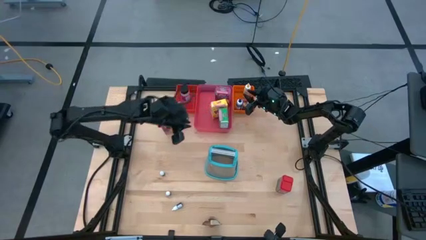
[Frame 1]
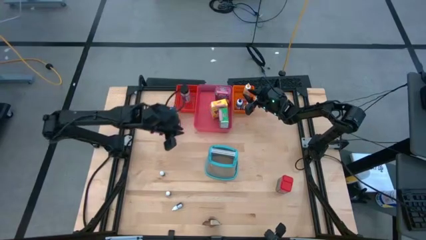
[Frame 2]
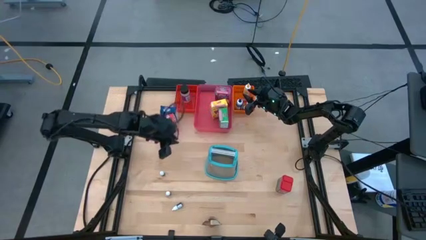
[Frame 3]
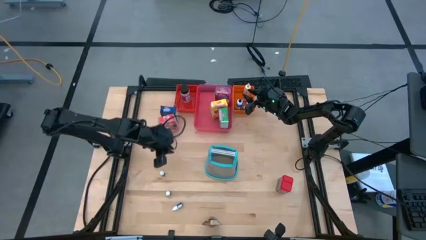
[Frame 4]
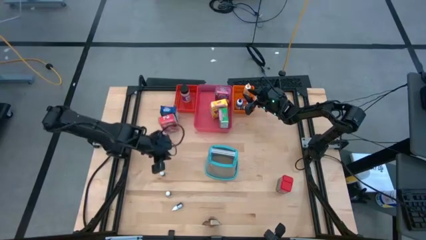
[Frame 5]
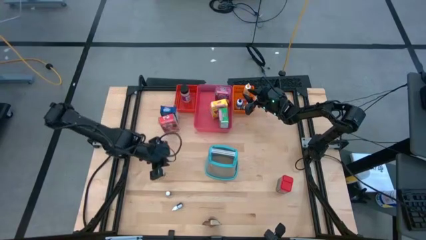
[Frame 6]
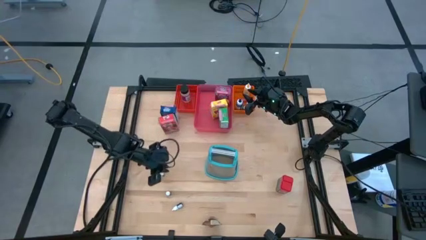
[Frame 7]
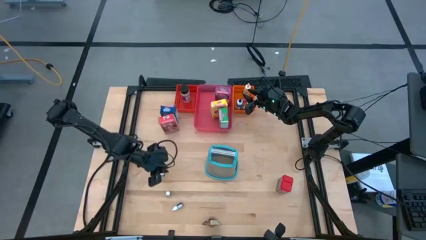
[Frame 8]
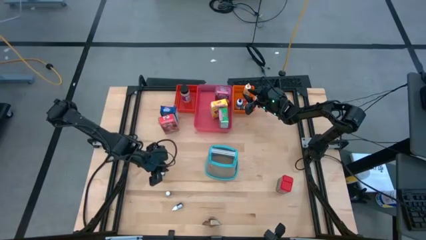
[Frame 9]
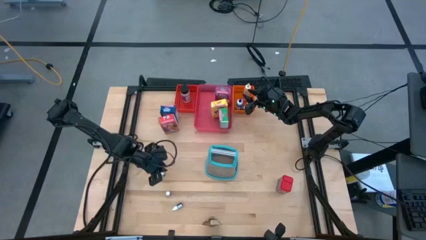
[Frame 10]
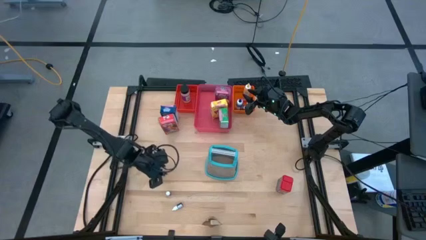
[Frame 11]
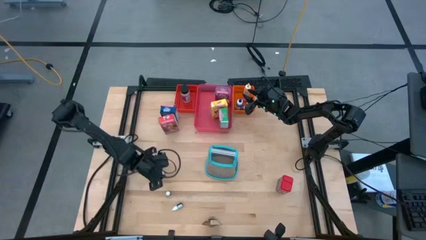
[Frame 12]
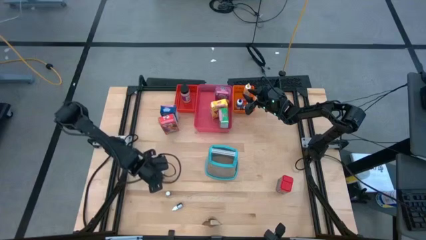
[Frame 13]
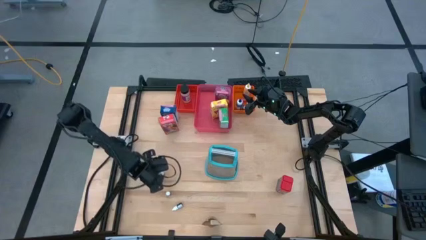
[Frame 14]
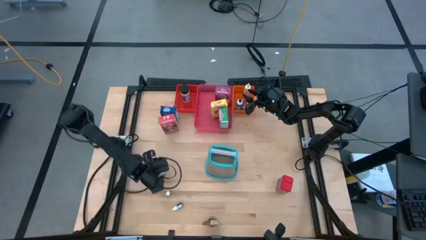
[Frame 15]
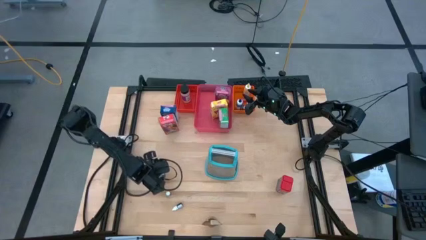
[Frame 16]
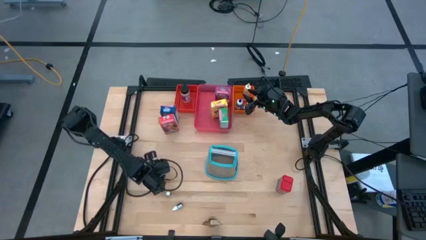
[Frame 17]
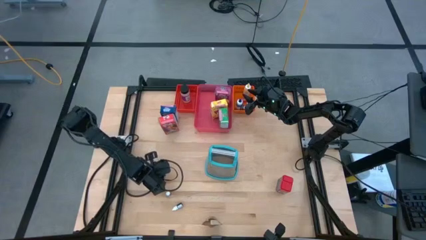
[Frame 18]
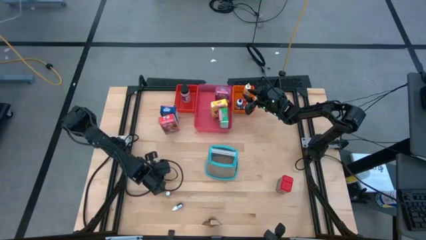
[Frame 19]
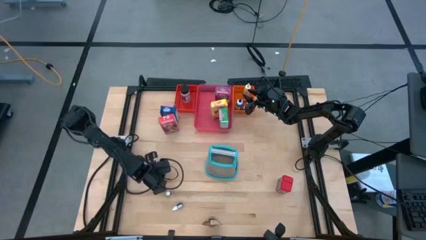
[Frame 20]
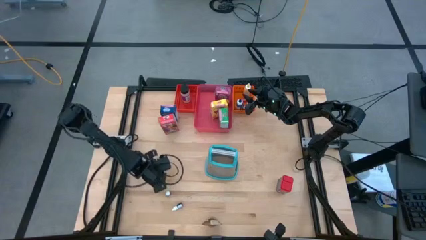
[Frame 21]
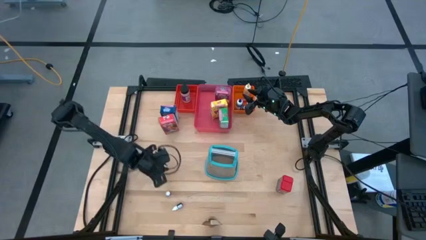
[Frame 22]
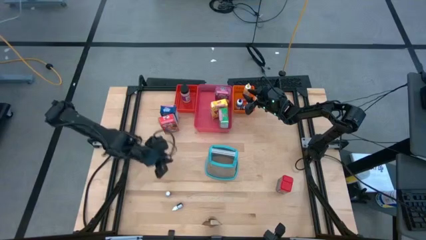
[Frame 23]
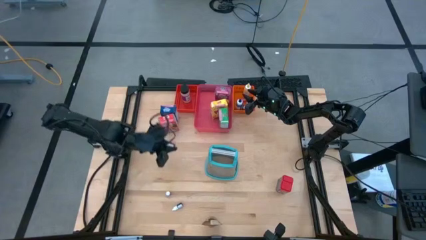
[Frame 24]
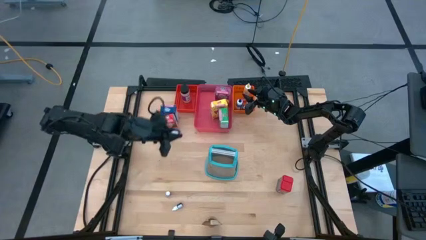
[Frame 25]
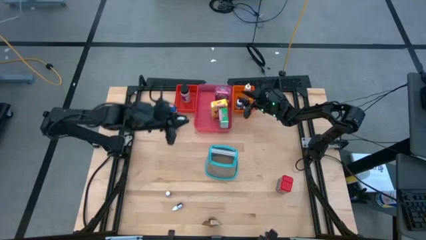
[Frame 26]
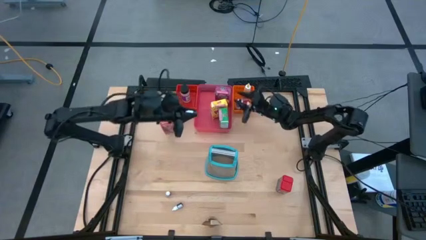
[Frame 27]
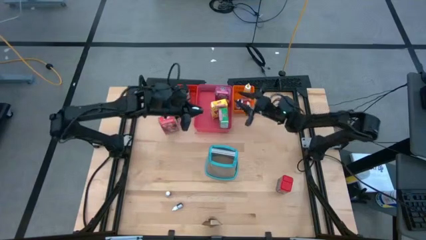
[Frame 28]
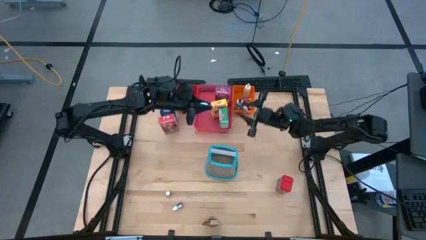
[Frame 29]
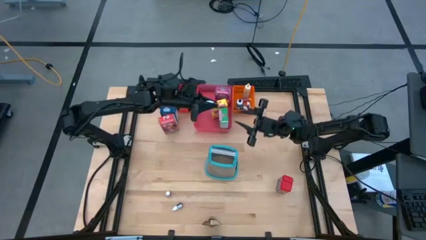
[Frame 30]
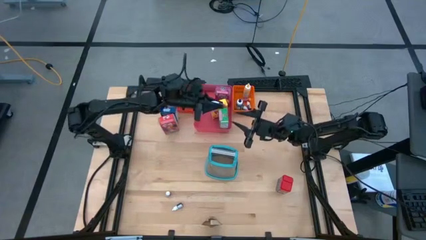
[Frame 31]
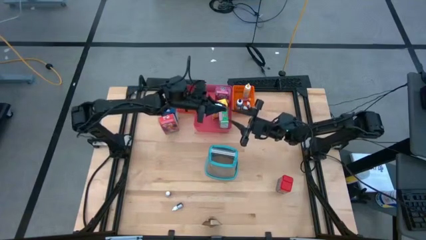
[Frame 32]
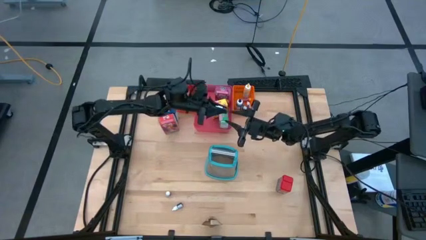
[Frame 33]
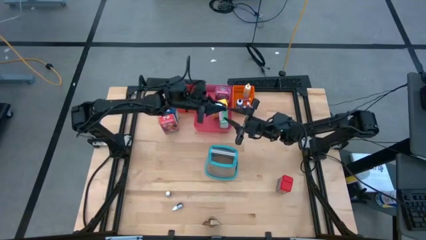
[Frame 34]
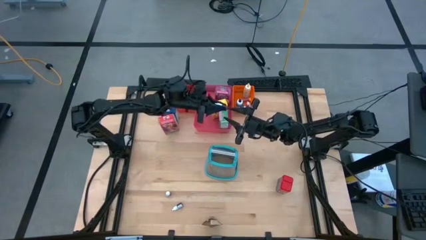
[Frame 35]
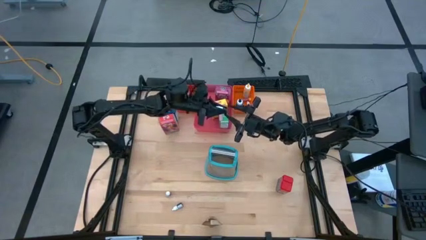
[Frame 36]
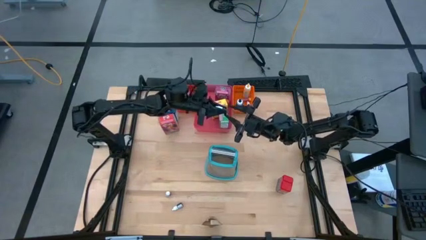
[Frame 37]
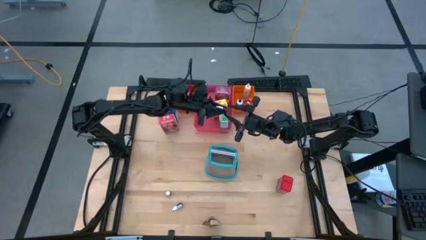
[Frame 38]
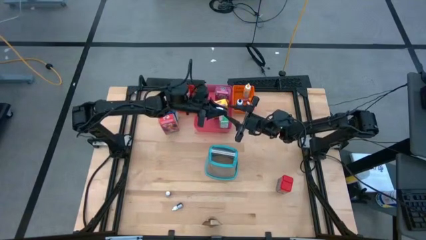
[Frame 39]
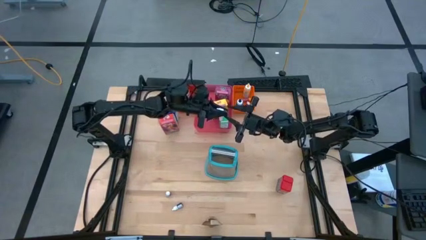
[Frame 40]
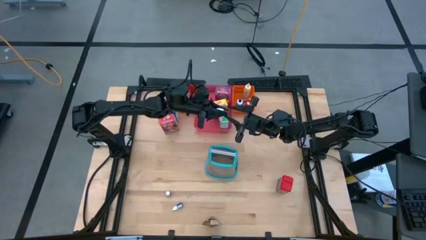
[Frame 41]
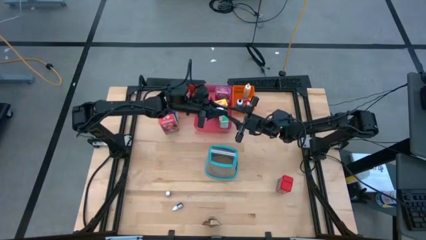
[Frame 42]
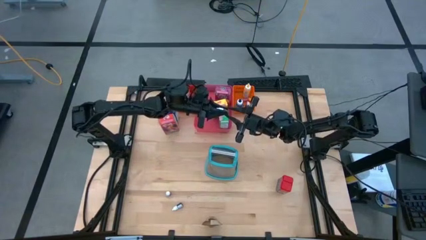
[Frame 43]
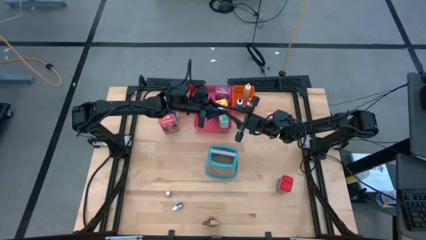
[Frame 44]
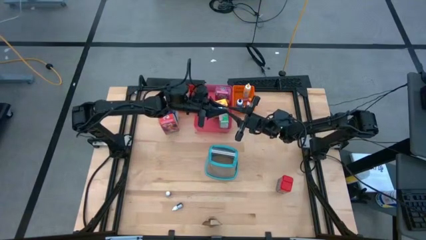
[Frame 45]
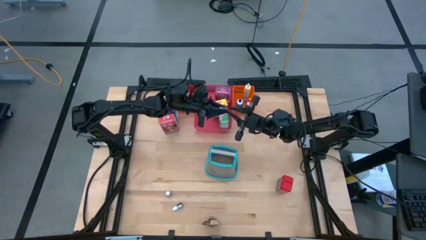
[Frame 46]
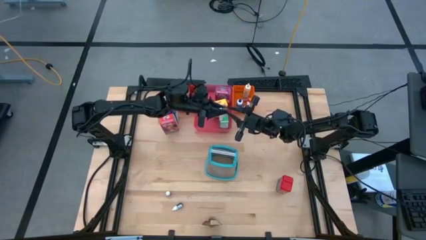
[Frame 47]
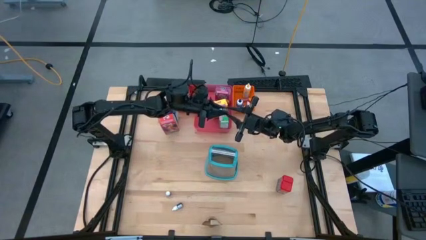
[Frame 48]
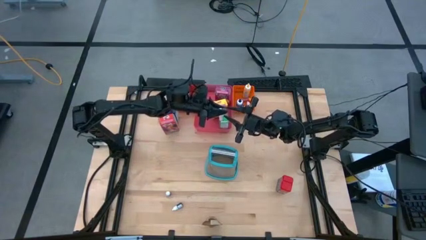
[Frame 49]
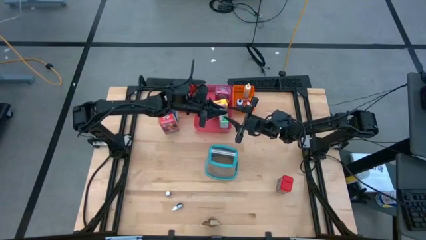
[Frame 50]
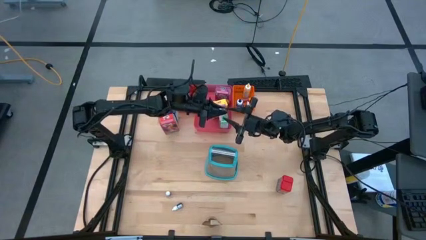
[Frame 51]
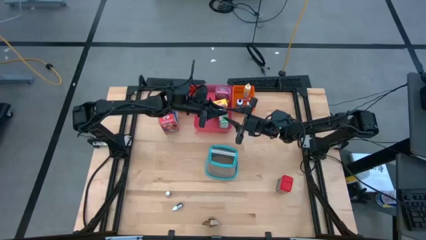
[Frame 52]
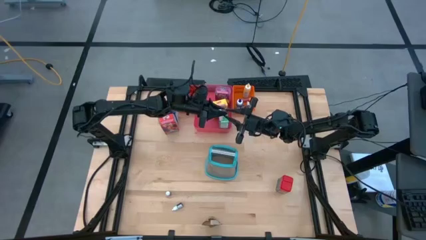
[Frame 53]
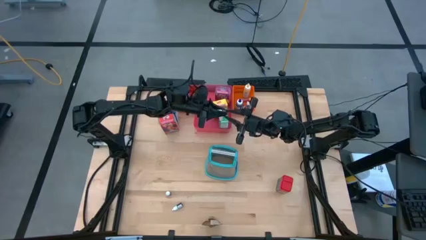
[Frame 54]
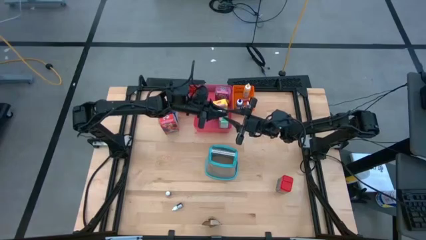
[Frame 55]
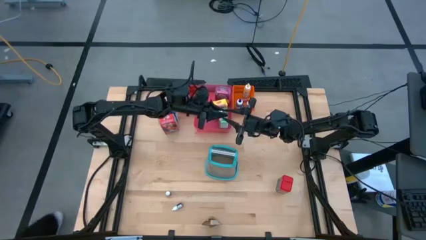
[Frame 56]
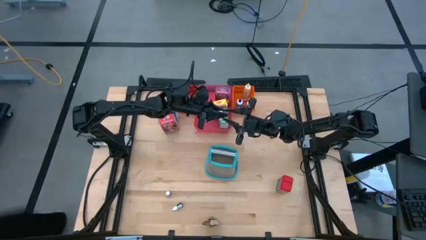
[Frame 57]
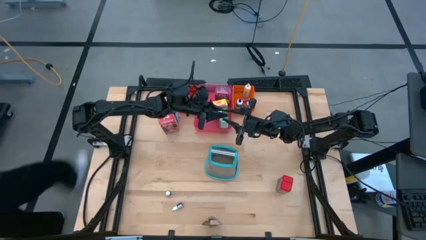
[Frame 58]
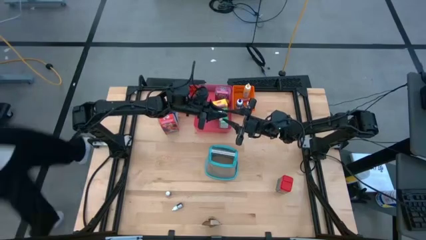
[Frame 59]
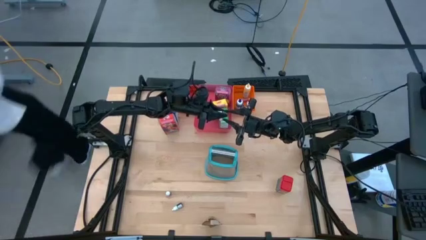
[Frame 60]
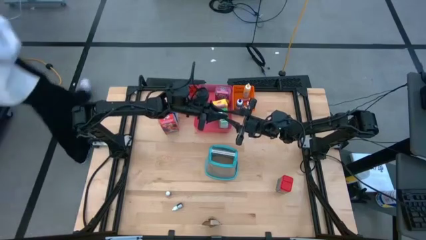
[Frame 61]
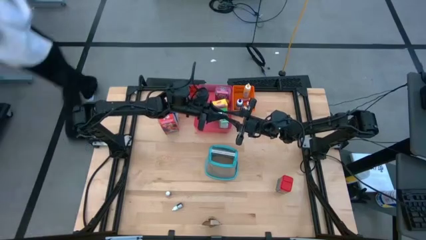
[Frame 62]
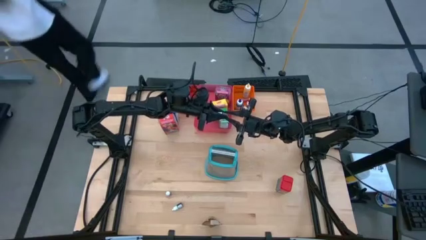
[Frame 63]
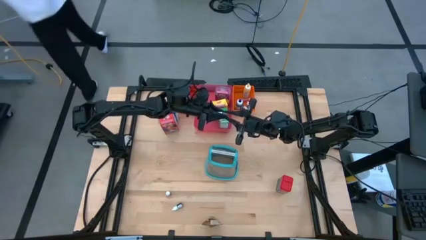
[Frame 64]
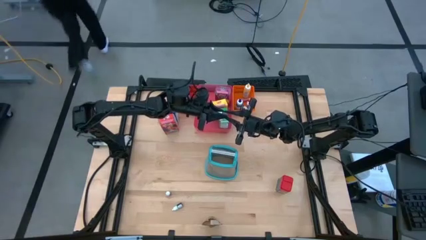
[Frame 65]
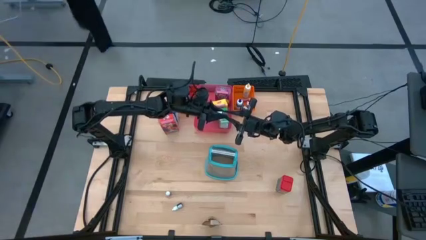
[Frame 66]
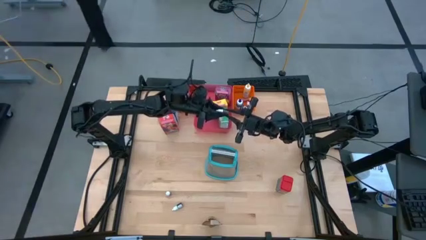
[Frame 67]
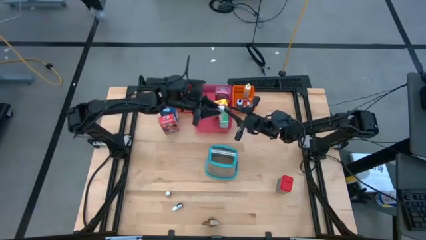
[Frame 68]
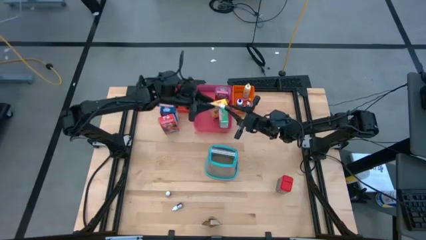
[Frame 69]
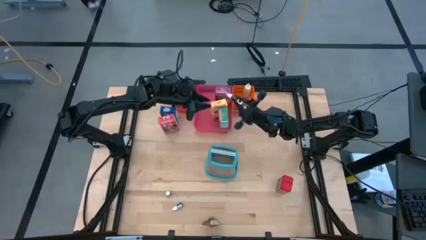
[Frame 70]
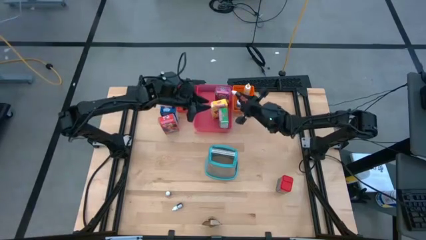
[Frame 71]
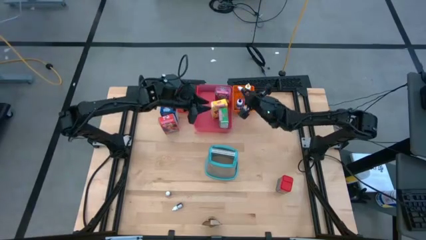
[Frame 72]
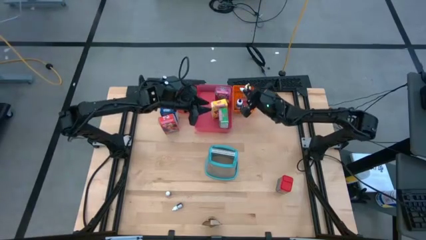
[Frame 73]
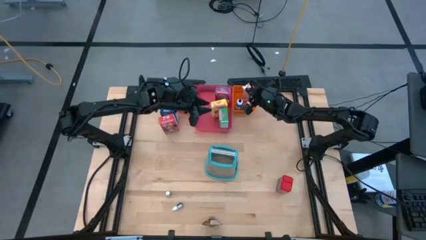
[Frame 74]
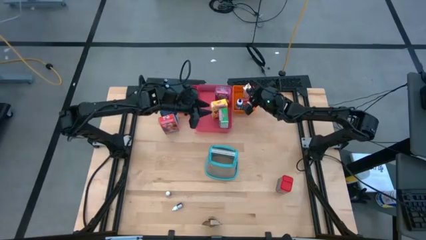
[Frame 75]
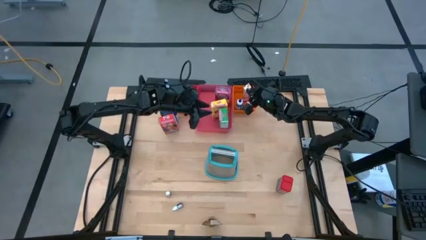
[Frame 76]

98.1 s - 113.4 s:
Task: Pick & Place Kitchen Items
Put the top small brown food coloring bottle into the orange bin
